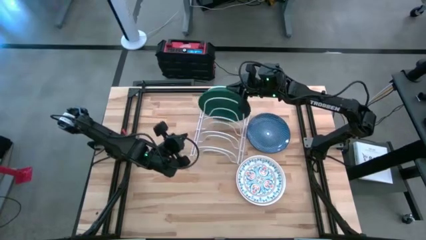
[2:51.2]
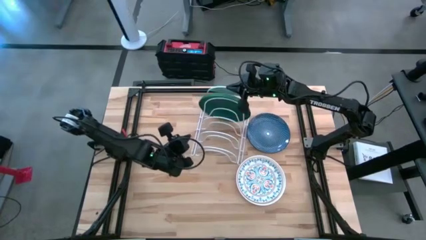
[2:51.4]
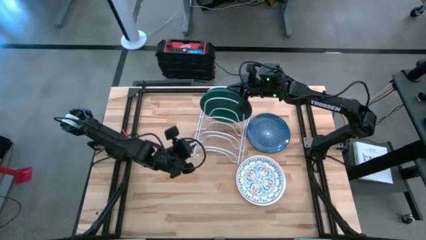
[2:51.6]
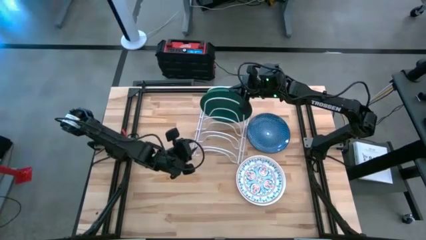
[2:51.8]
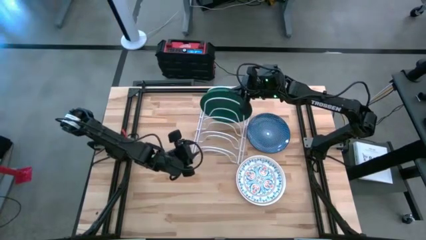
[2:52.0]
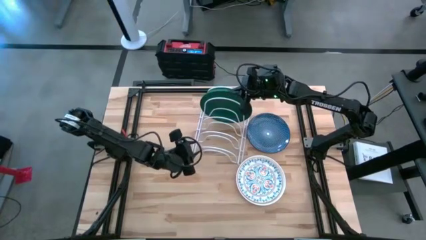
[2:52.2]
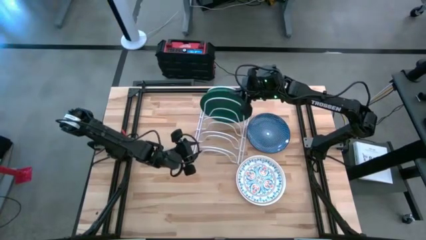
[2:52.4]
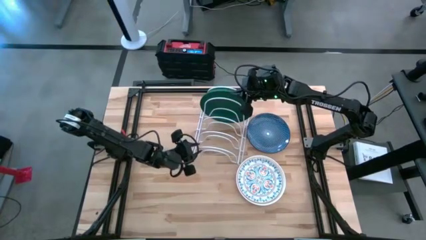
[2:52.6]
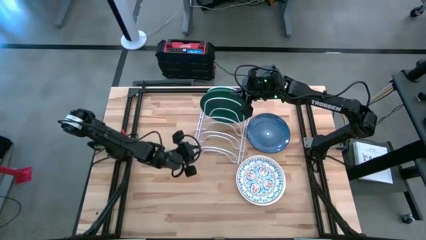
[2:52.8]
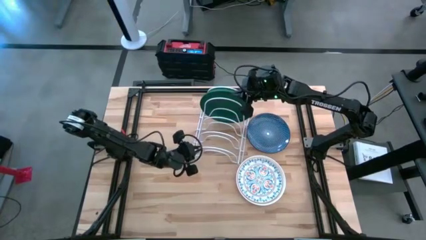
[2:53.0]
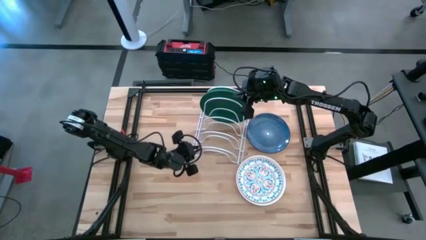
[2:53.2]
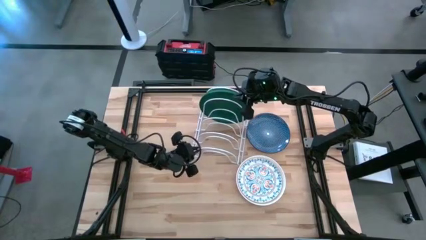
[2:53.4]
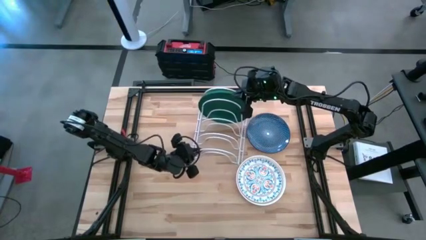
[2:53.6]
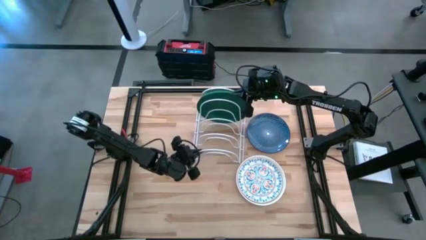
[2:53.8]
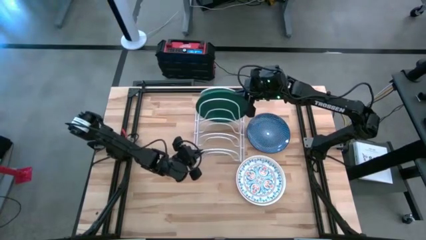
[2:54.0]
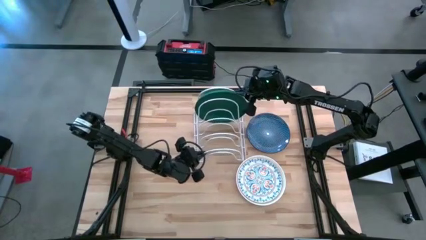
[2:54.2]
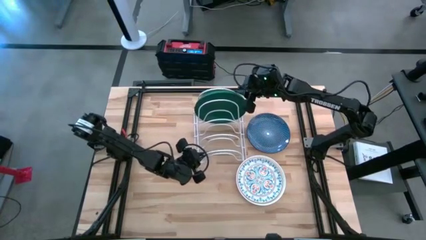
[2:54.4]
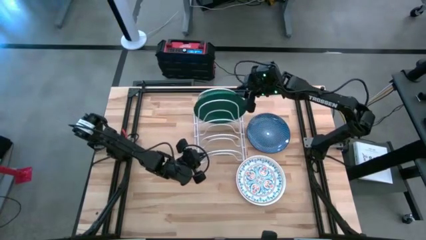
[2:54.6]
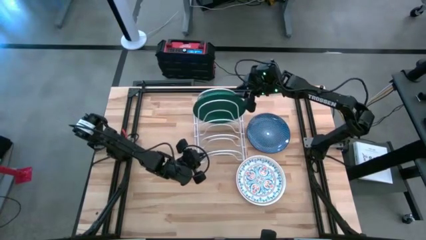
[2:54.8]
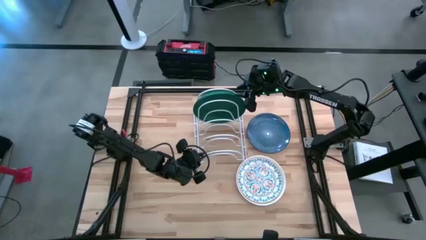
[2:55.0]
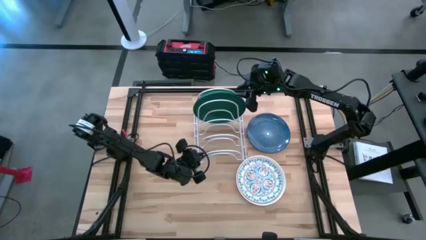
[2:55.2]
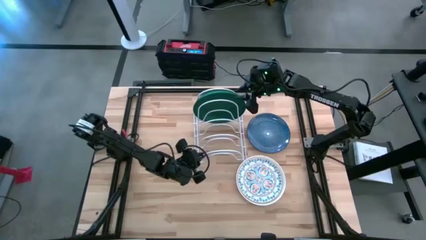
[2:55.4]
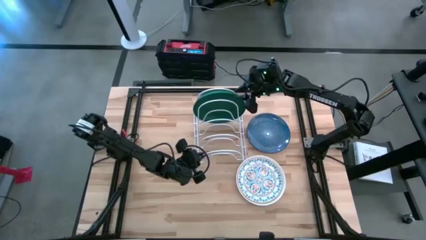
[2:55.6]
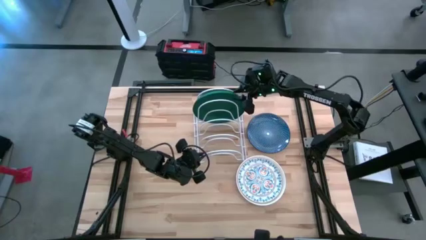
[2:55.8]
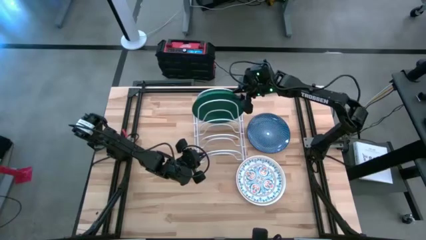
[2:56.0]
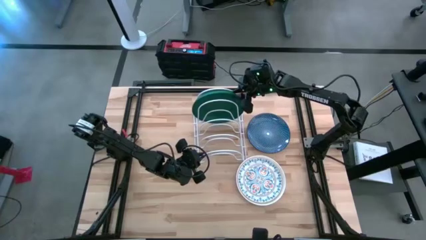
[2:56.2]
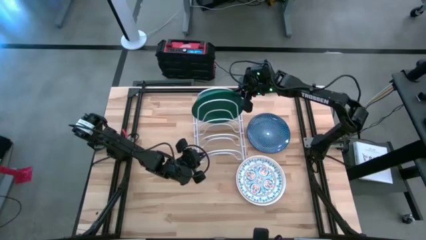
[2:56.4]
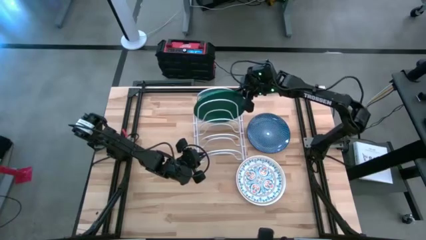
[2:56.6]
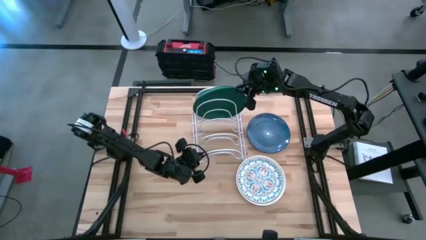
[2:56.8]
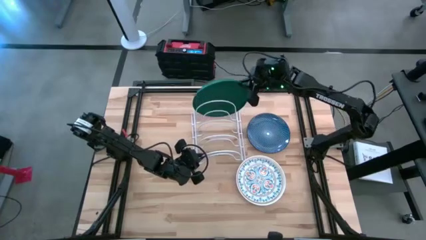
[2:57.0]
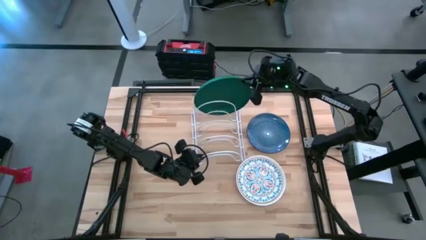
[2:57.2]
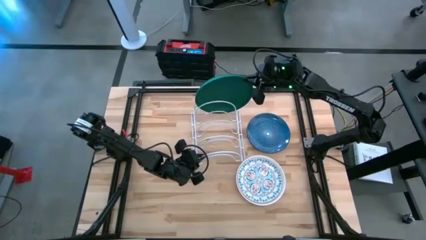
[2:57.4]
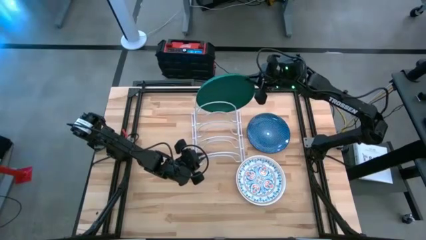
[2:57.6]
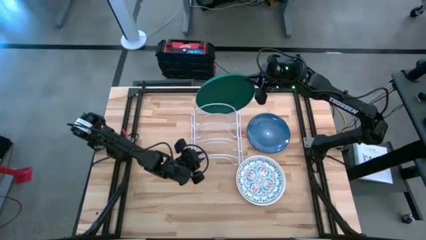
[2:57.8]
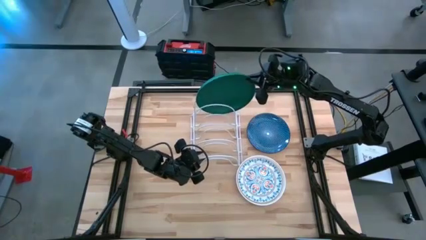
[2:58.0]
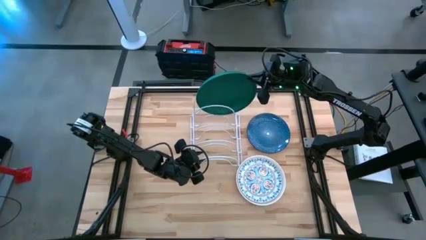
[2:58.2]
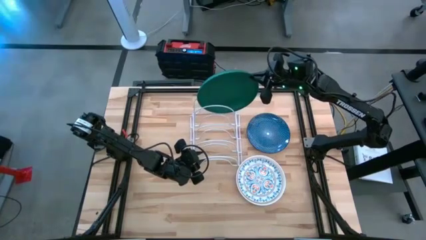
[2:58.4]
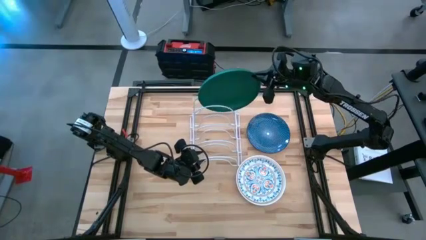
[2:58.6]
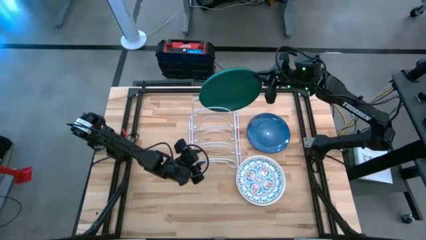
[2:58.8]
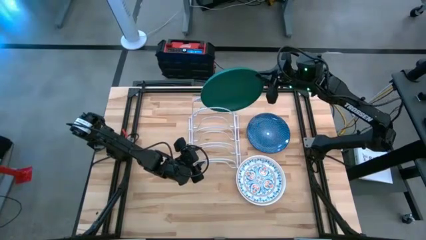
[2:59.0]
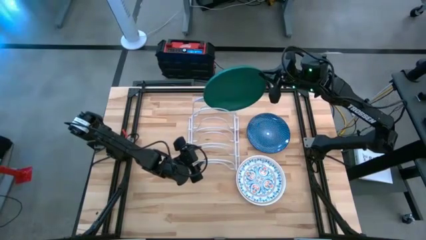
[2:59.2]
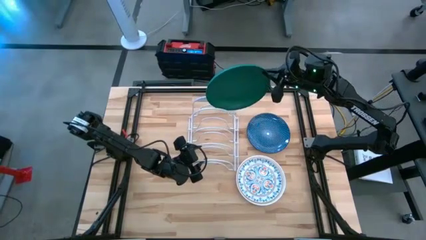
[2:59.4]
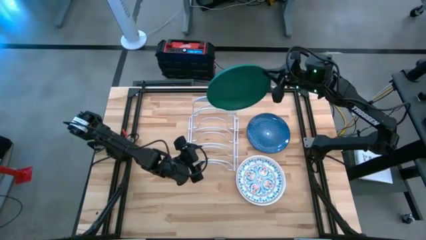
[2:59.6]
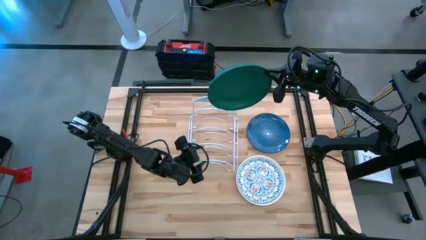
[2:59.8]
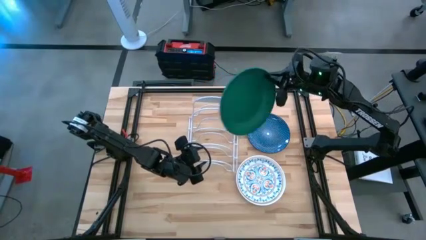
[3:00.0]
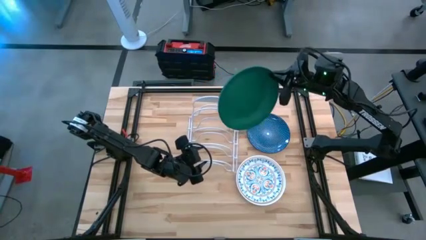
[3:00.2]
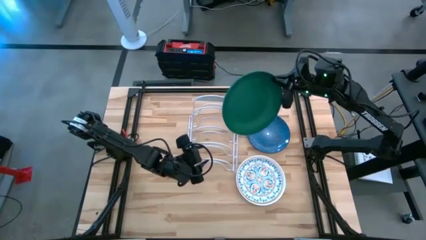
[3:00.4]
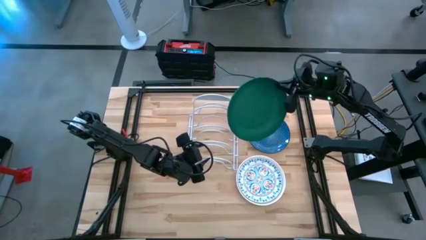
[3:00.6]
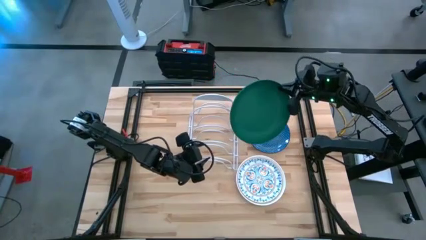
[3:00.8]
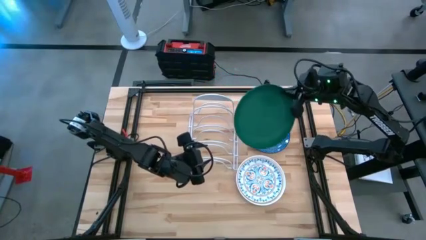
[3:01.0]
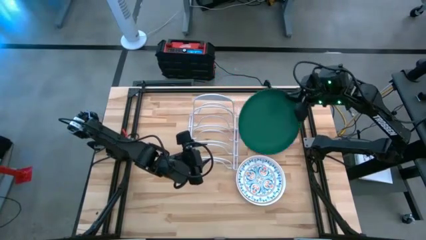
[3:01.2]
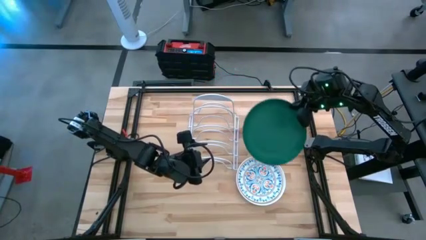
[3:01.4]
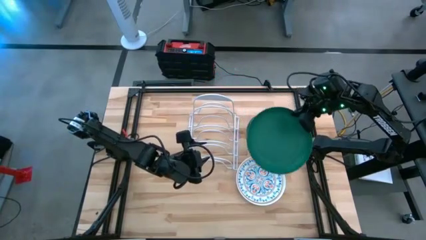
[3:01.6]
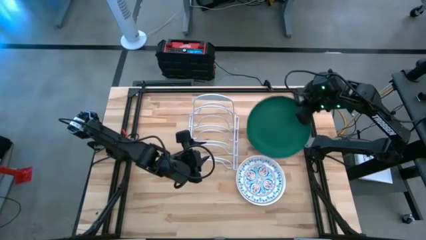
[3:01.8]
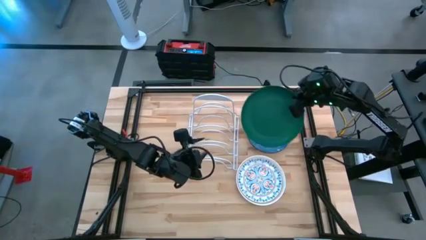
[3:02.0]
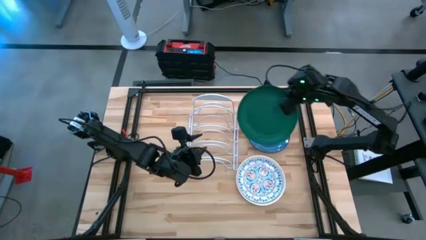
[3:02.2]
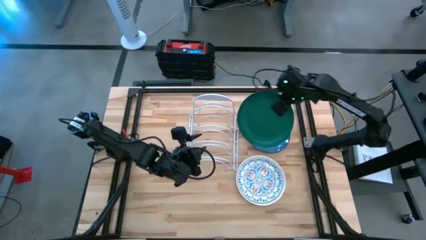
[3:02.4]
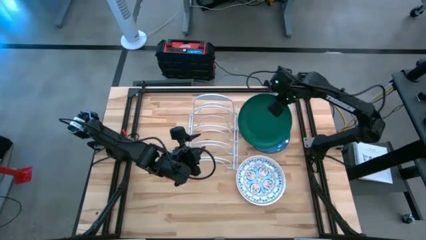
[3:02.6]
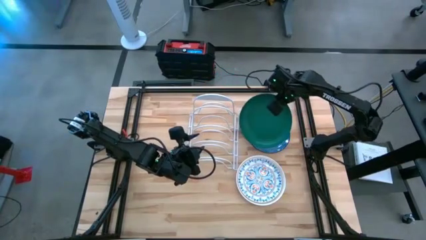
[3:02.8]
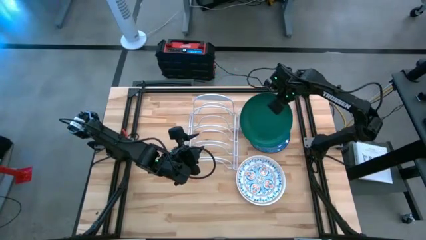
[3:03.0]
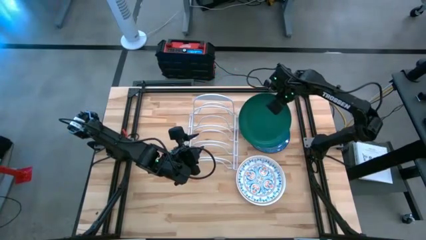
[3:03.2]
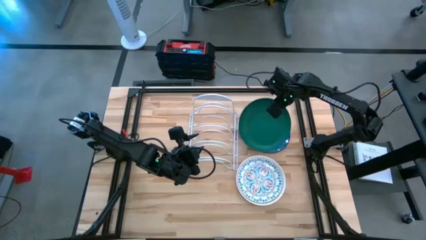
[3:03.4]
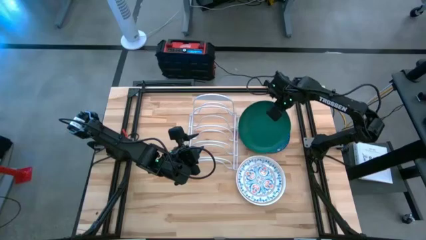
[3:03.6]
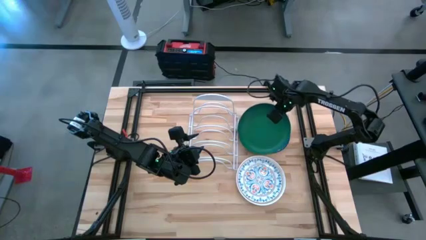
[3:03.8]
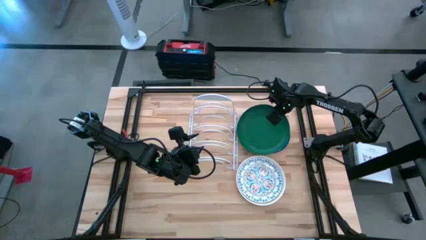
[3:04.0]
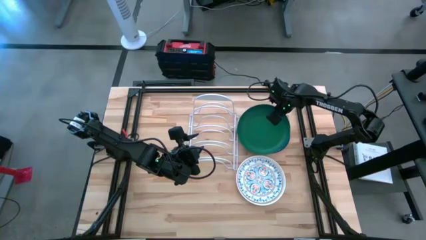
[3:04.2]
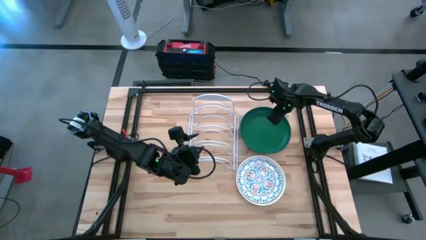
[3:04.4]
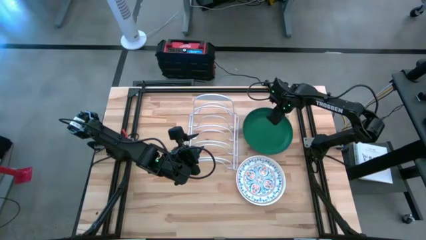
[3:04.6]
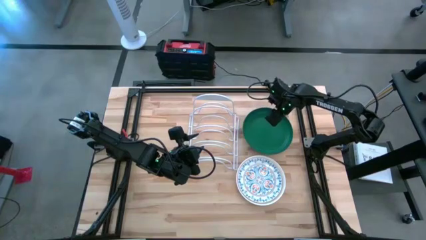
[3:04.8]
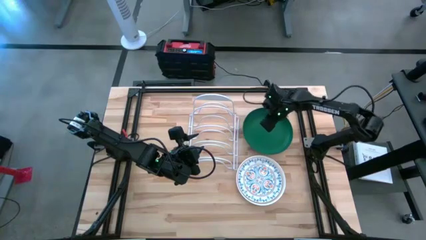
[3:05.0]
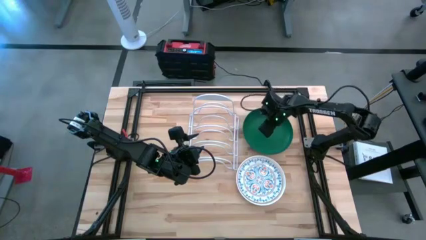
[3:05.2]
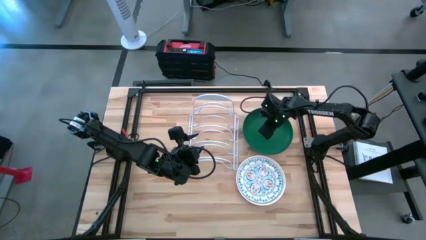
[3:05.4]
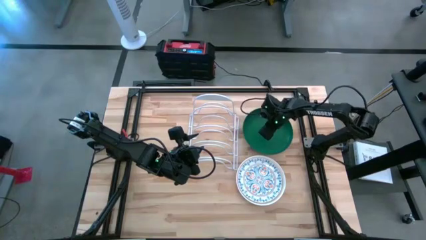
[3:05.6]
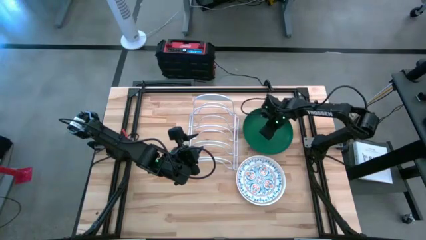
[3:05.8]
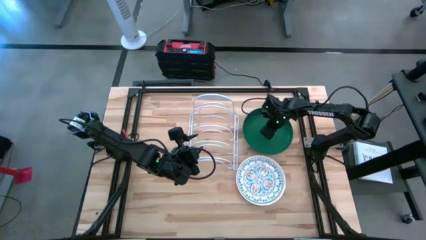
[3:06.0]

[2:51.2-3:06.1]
Task: Sort dishes
Remove the green plate from the dish rack

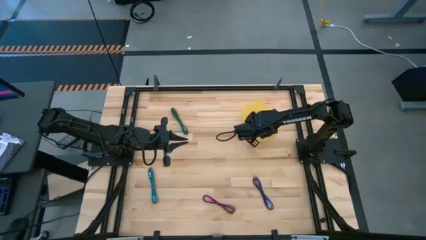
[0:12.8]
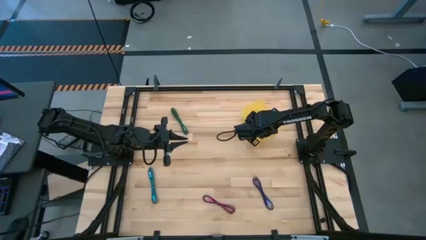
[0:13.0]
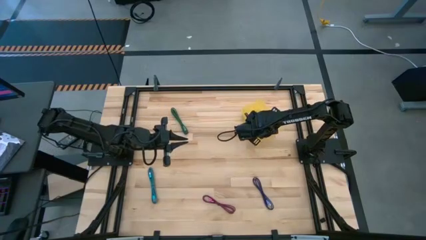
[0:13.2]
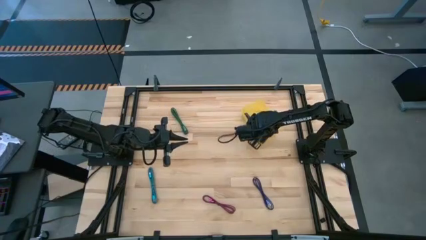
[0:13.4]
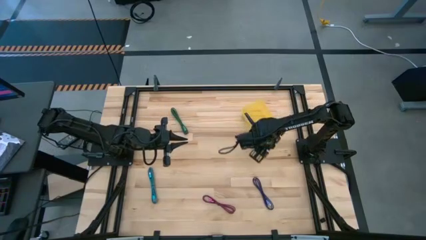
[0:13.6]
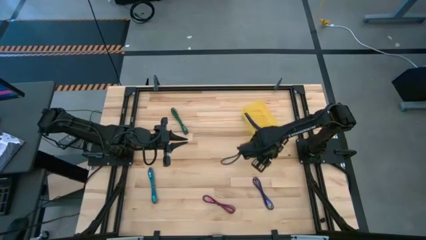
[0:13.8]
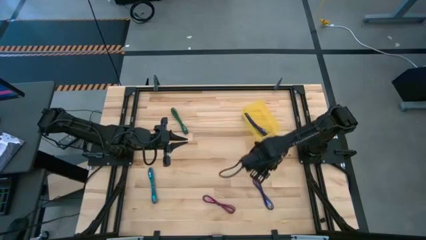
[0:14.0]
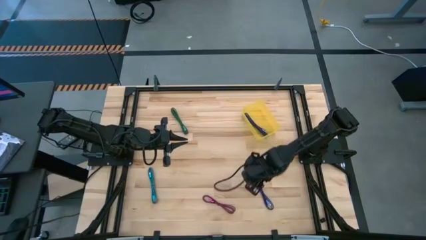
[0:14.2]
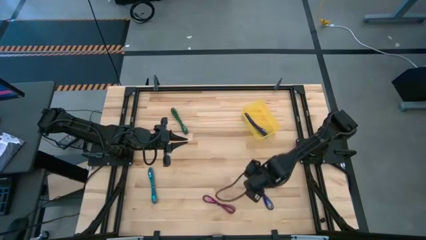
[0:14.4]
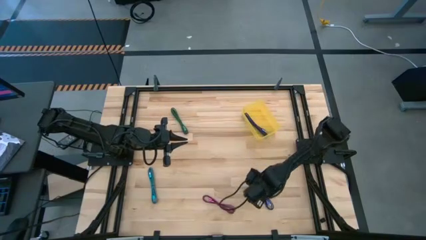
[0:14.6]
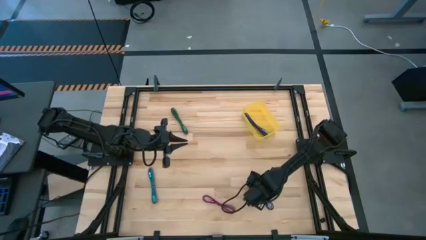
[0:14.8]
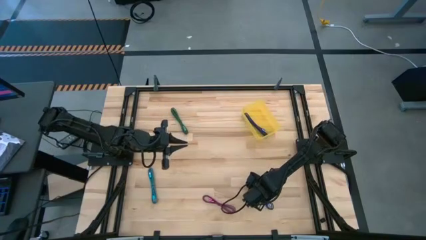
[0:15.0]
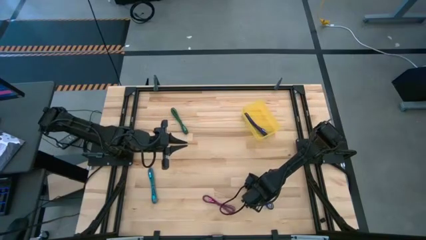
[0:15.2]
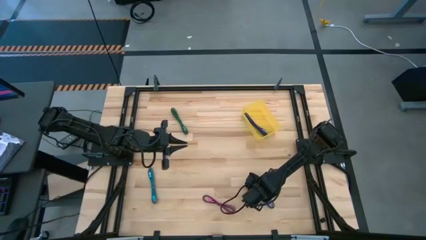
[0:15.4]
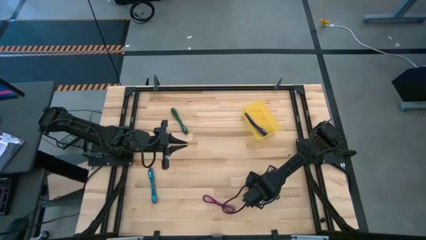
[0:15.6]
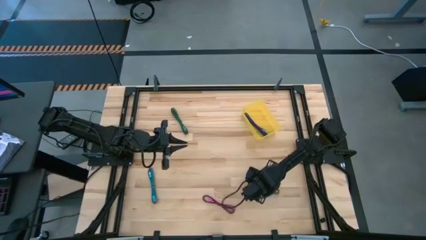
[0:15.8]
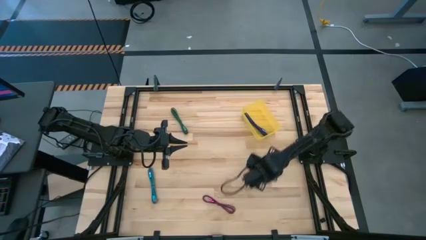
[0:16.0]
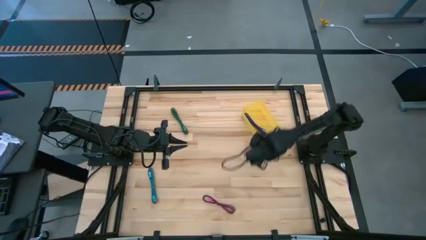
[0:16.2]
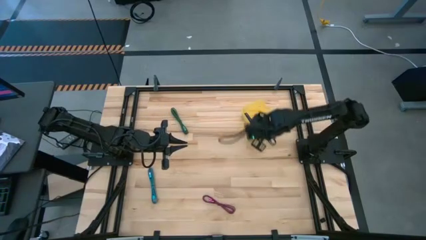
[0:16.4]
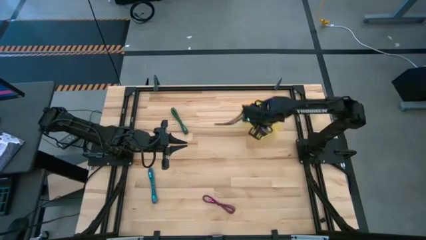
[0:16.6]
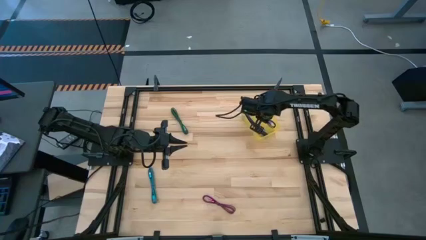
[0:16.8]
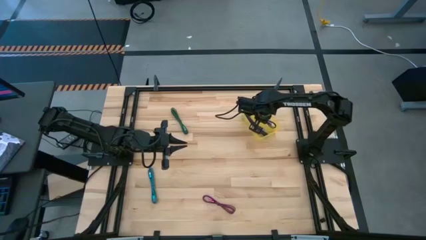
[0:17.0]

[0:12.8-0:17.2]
Task: Pick and place USB-C Cables
Put the purple and black charger cable into the yellow bin
